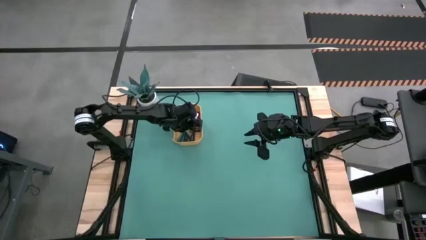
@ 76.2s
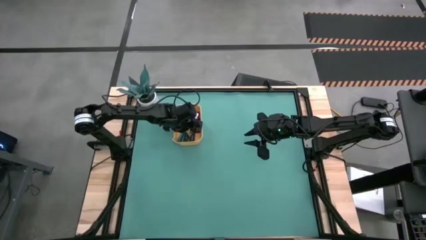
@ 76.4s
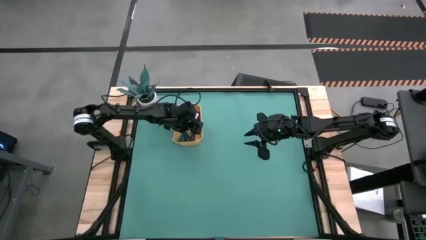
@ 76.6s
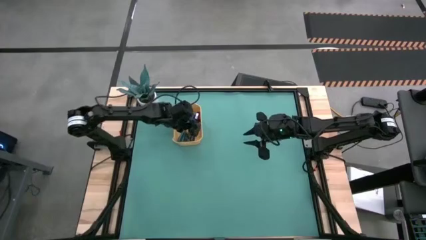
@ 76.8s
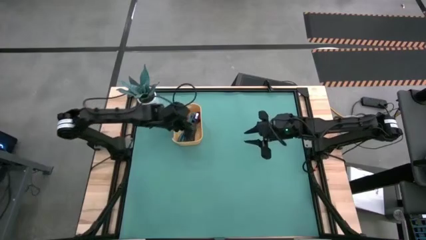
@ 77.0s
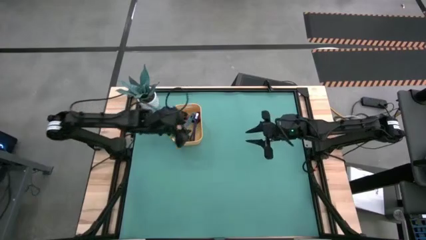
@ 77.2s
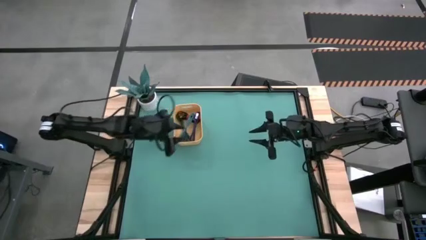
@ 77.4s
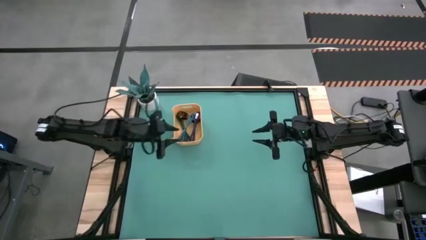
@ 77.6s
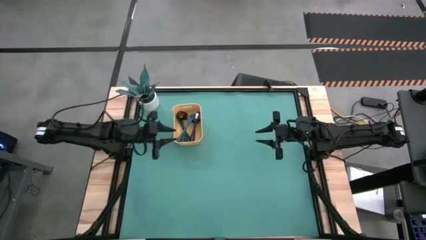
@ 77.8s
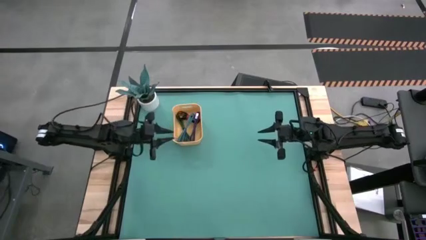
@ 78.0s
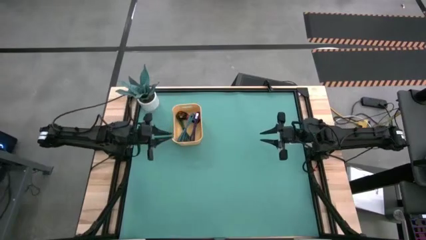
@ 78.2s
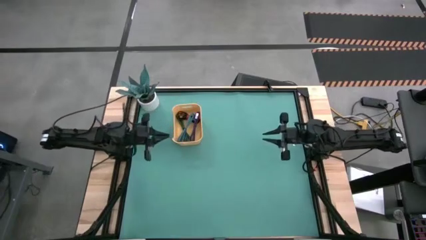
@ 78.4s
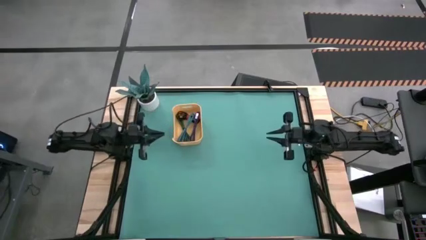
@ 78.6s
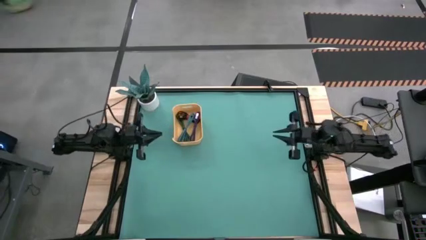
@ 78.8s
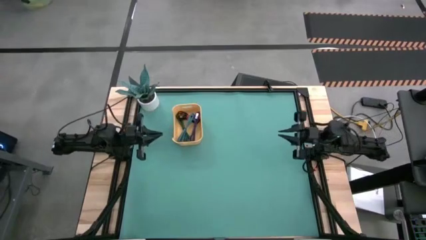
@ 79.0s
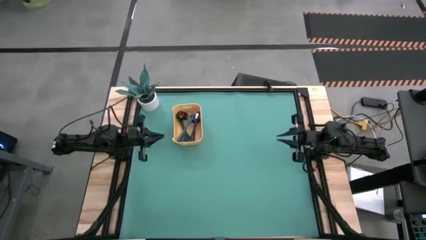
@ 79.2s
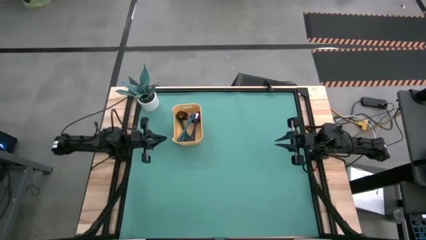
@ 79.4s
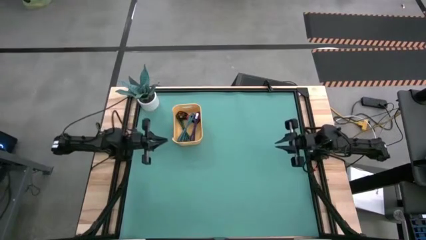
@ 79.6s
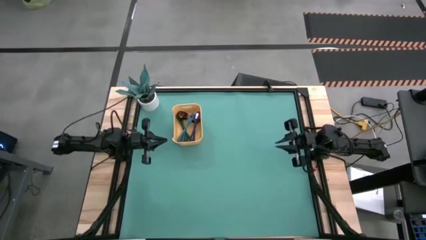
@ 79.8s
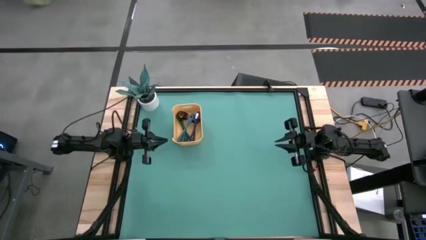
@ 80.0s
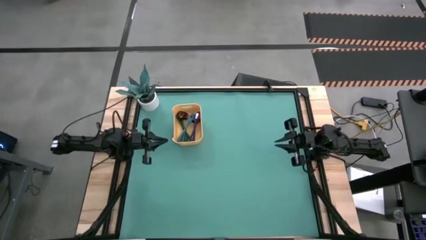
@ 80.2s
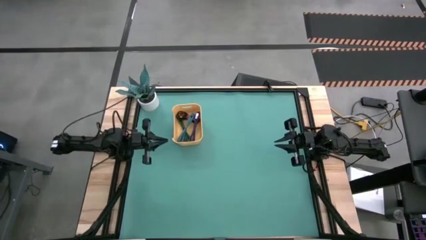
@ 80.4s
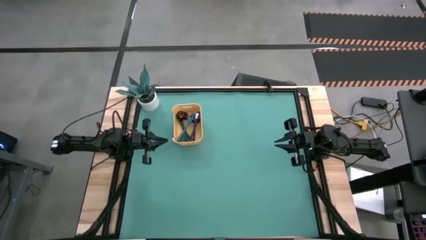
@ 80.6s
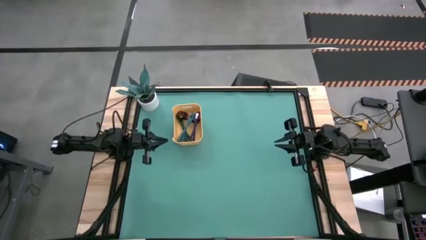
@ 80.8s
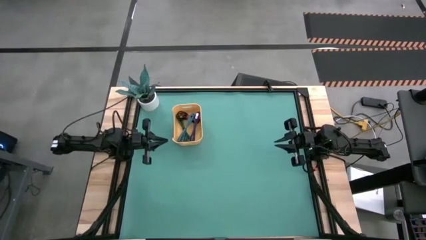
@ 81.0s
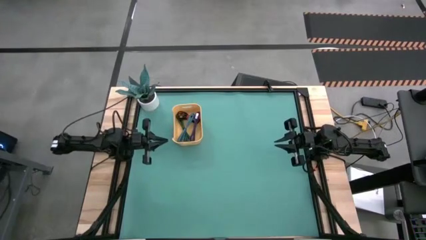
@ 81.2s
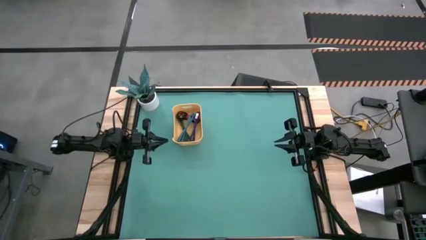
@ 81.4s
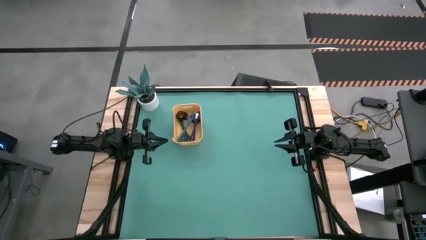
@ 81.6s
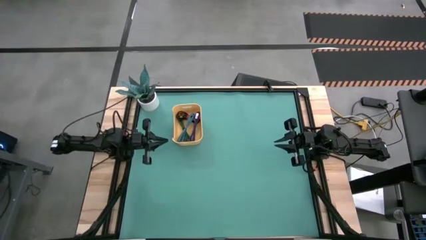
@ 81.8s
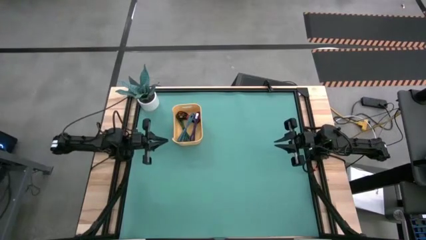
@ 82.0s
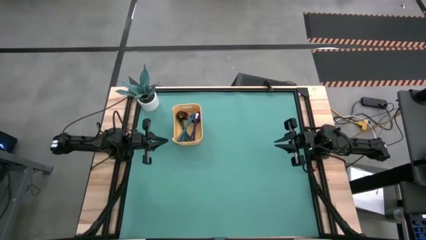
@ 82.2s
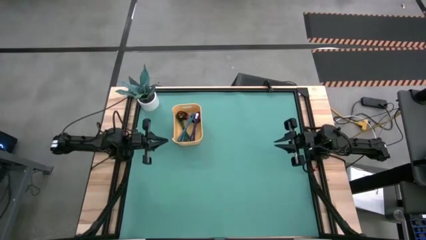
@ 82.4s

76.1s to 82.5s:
Task: Pick and place USB-C Cables
Return to Home Position

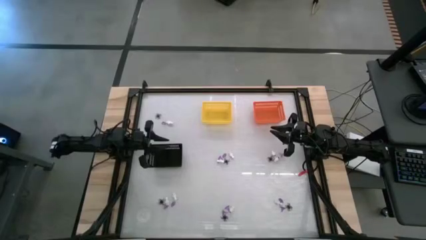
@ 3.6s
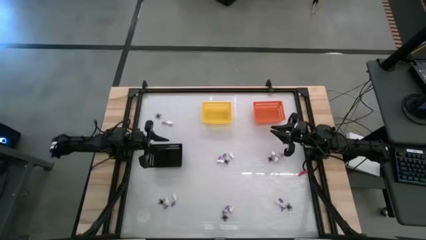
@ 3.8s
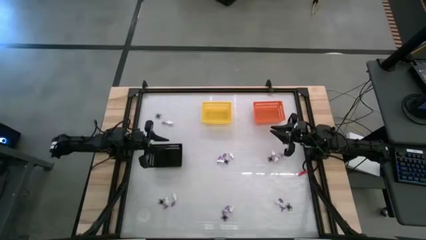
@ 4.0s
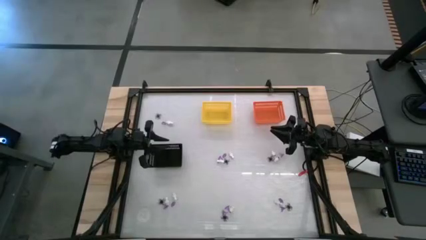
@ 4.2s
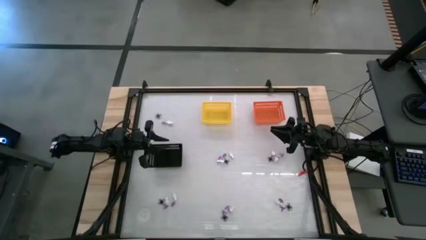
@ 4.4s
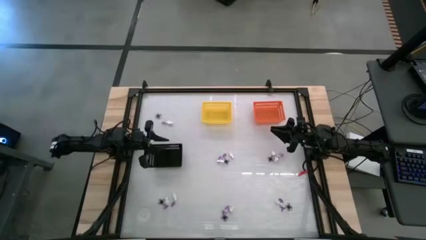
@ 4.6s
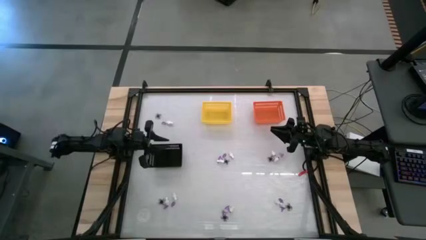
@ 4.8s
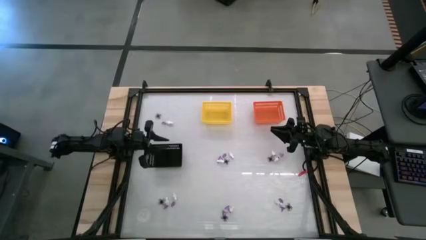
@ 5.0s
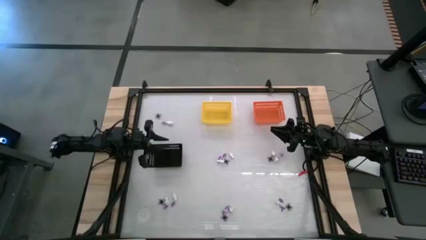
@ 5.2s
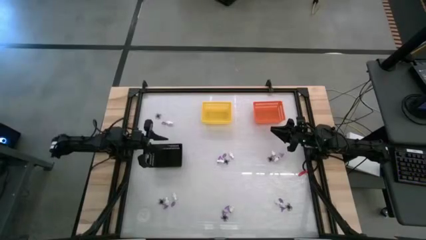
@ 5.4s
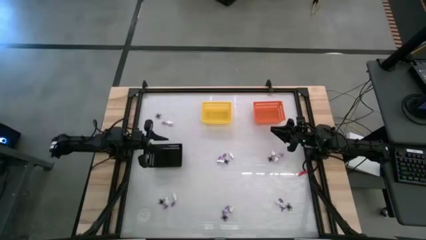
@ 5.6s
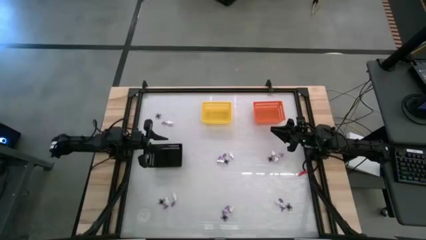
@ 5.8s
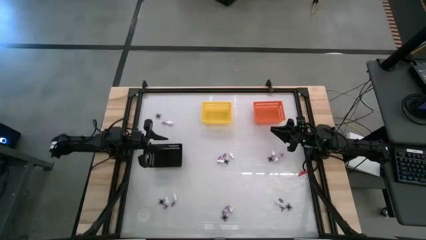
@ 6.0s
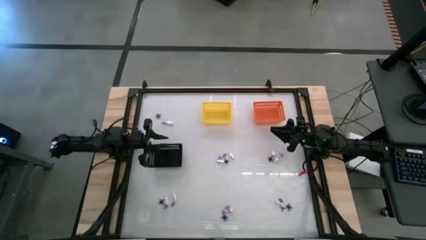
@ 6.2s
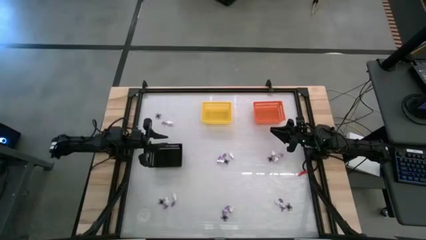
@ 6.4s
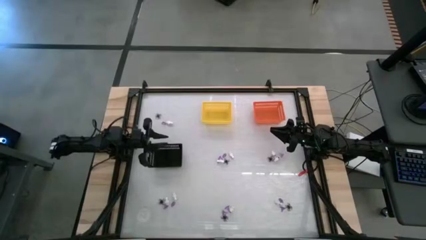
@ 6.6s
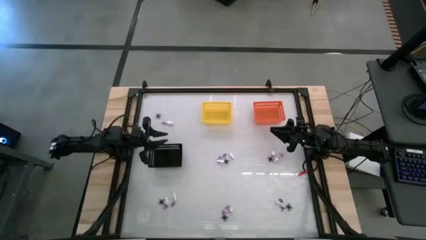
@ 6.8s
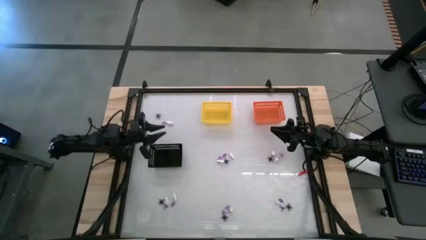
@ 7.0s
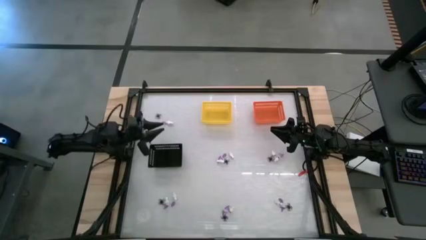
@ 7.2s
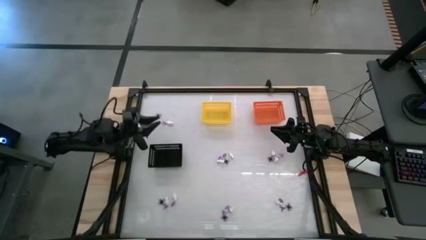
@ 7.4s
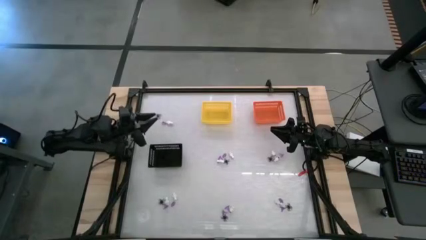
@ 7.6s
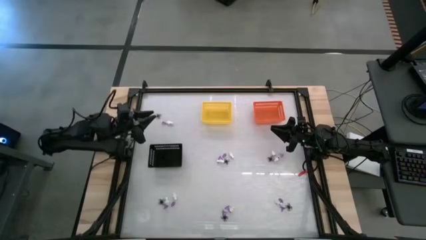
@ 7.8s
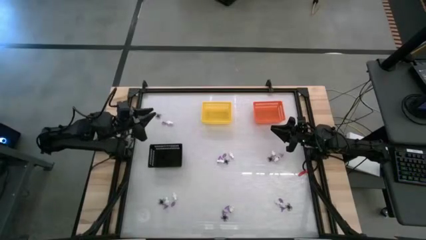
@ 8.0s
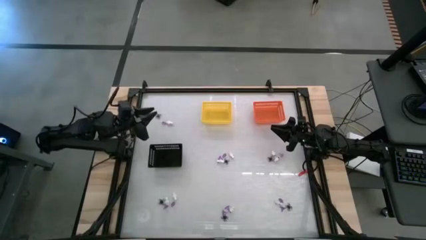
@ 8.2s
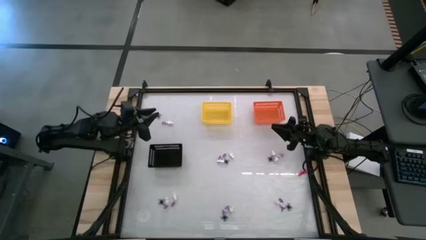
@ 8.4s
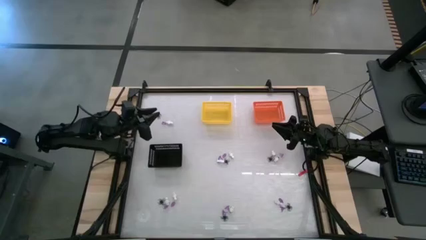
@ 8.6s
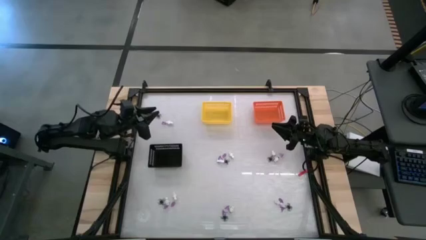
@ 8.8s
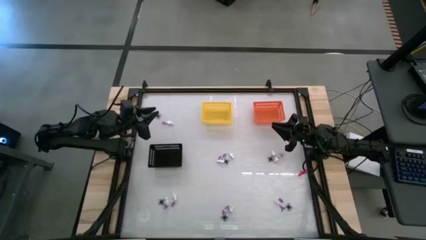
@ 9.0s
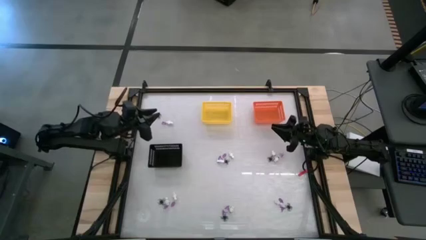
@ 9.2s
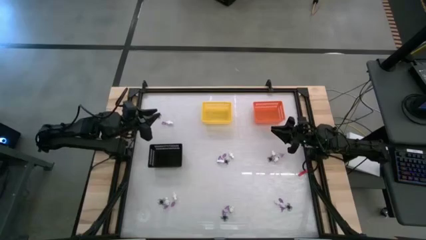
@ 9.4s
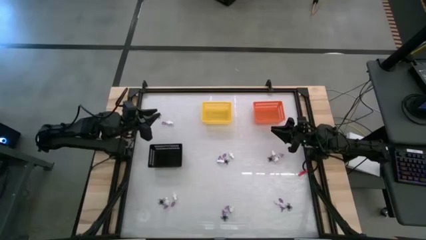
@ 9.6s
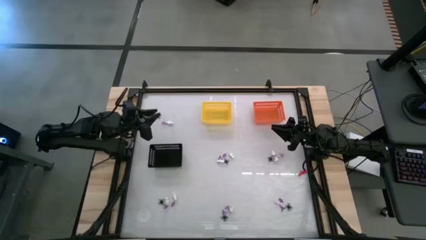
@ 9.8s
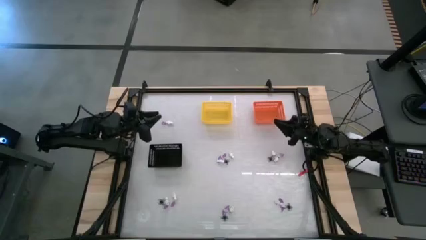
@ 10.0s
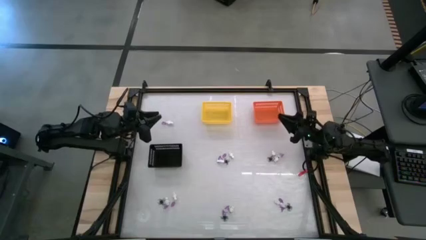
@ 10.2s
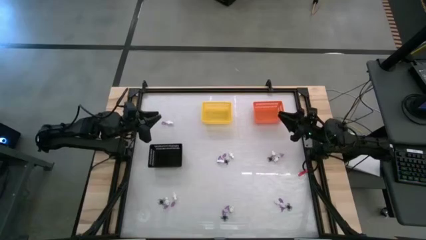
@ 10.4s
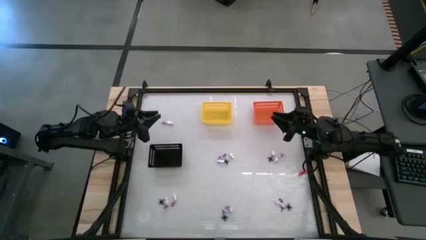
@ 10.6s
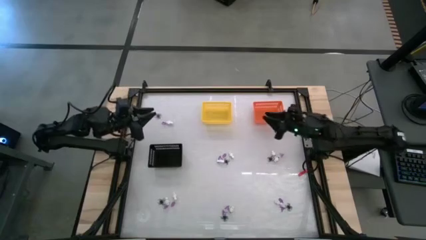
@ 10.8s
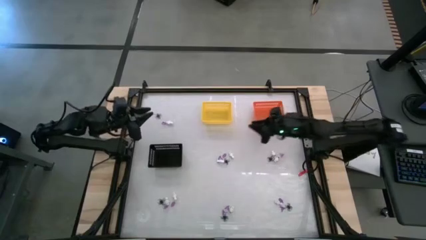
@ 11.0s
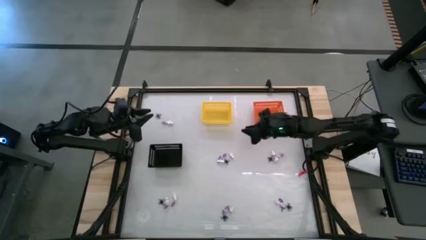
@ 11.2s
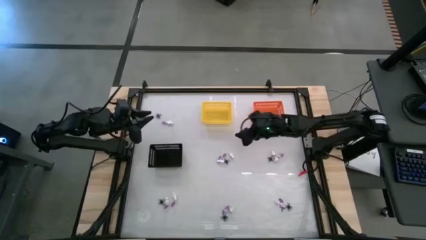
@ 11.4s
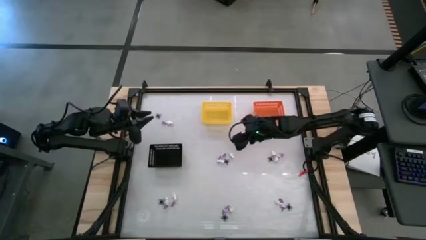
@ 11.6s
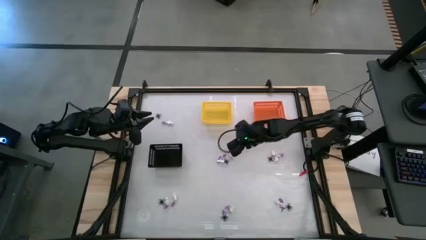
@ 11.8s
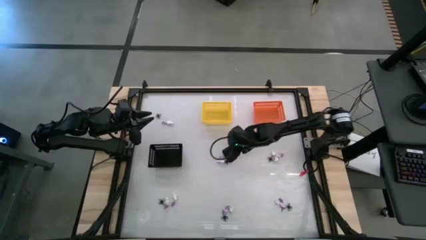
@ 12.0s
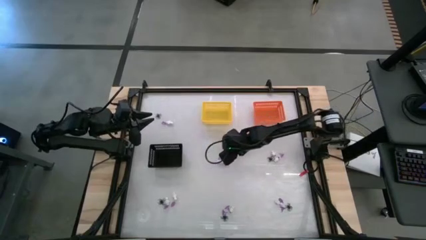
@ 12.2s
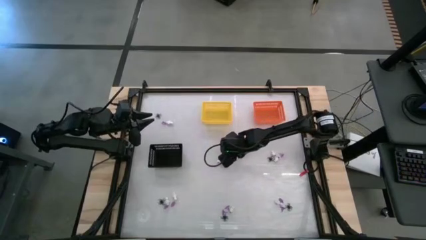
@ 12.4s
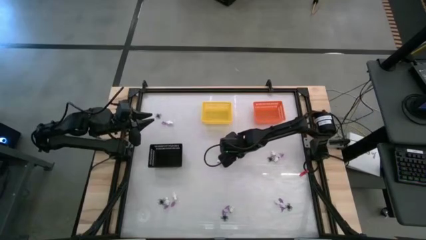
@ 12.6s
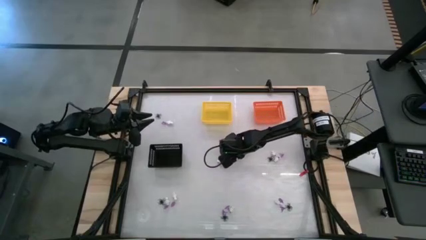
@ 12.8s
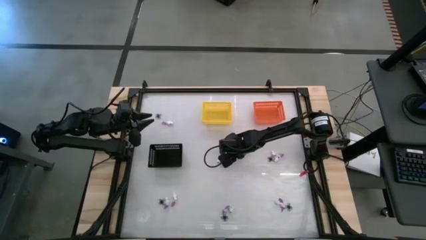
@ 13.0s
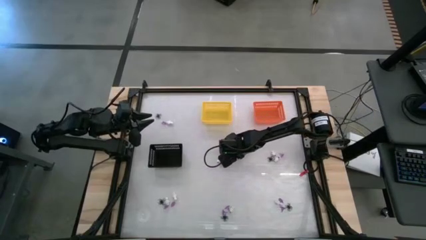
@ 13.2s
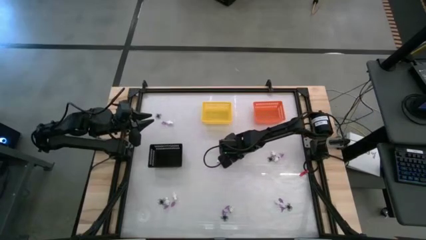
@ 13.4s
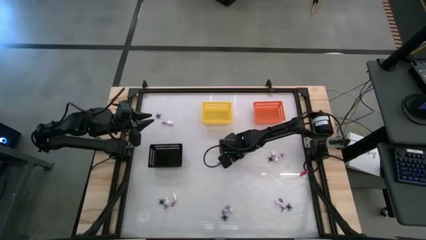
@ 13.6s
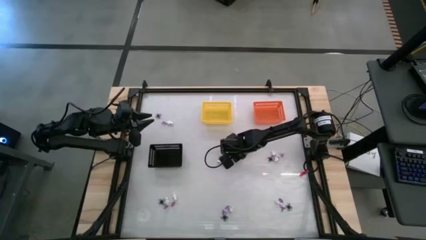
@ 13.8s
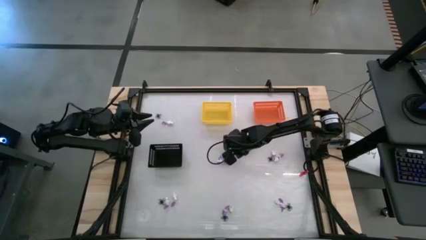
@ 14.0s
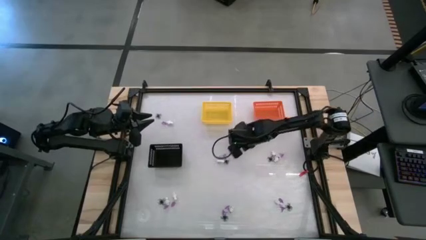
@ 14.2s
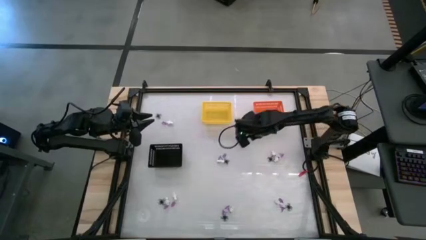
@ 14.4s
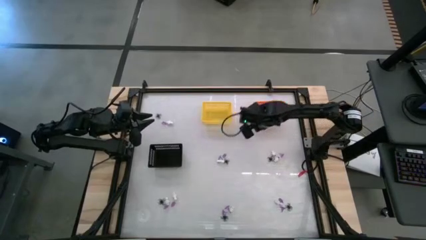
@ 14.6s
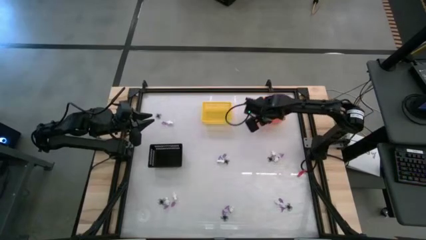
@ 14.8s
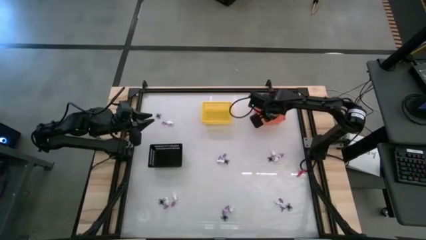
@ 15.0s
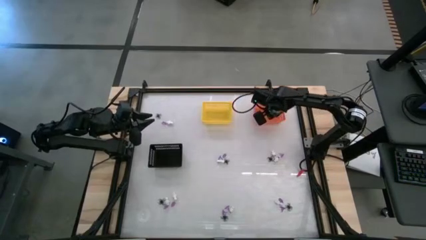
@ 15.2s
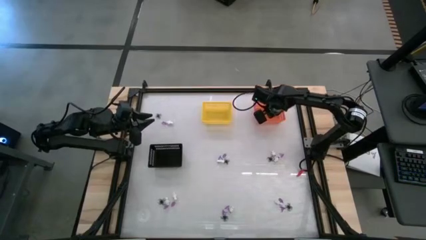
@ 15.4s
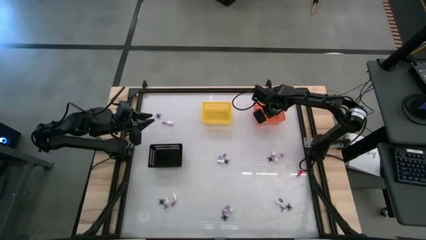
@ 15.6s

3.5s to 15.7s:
Task: Sort Halloween decoration
Put the white skeleton toy into the orange basket
